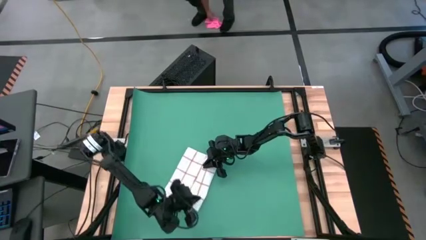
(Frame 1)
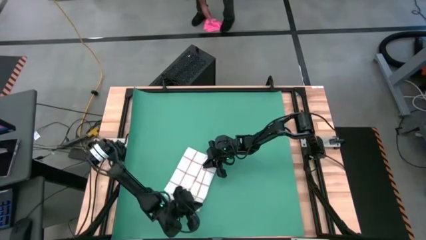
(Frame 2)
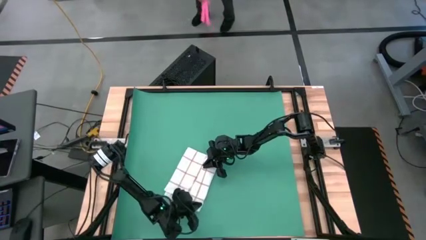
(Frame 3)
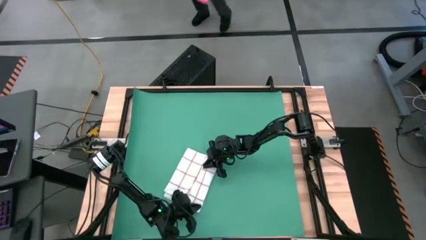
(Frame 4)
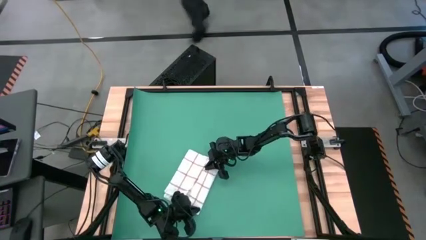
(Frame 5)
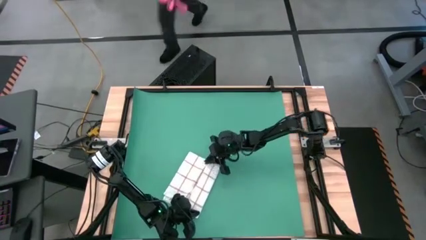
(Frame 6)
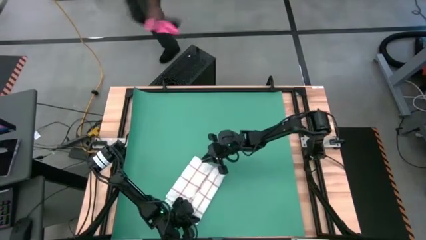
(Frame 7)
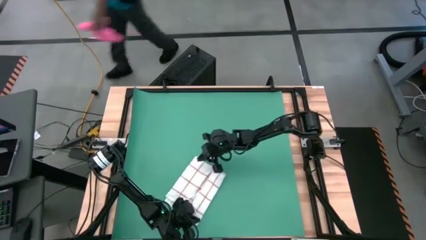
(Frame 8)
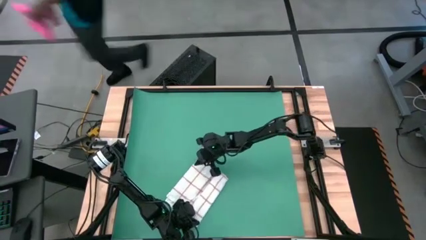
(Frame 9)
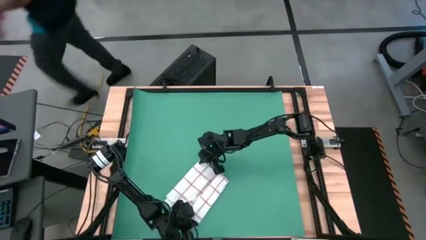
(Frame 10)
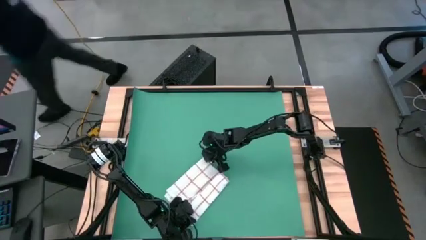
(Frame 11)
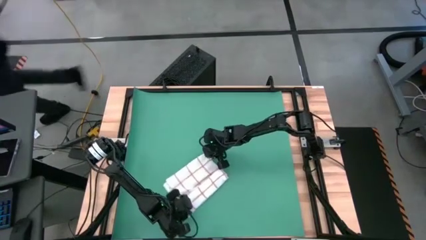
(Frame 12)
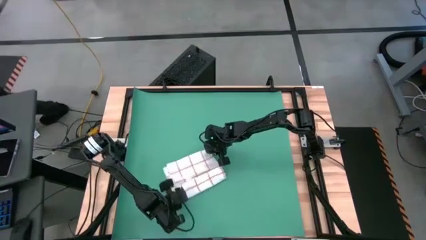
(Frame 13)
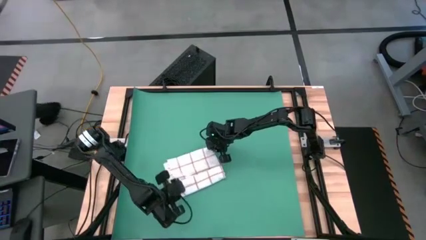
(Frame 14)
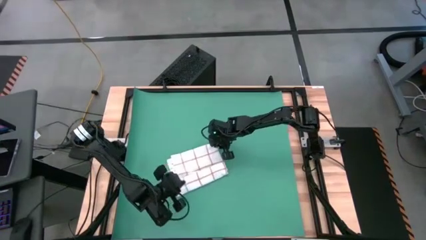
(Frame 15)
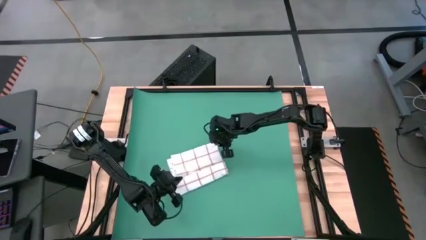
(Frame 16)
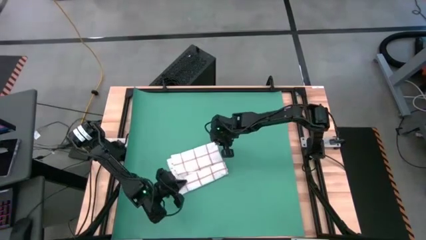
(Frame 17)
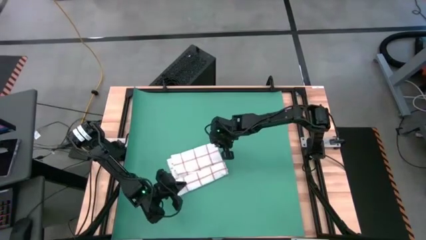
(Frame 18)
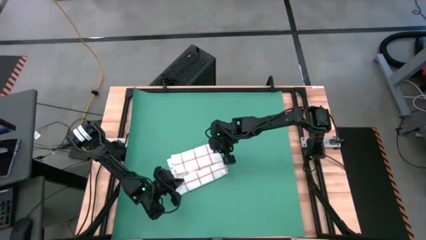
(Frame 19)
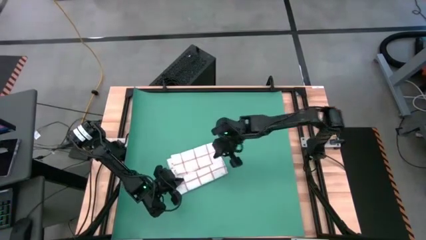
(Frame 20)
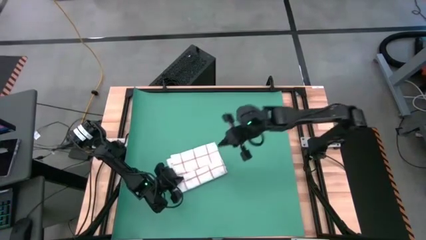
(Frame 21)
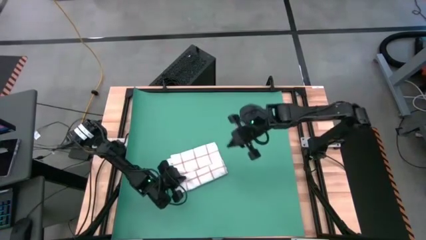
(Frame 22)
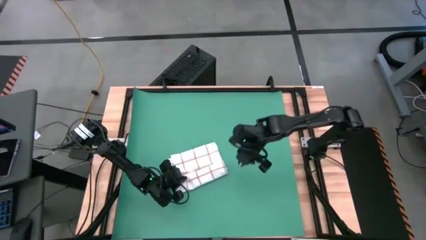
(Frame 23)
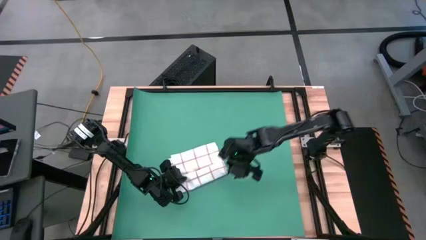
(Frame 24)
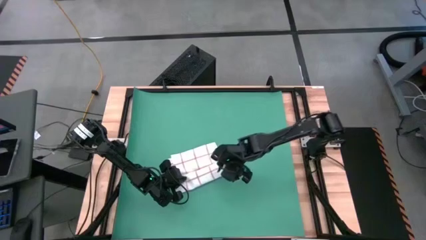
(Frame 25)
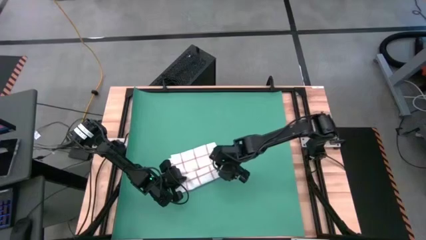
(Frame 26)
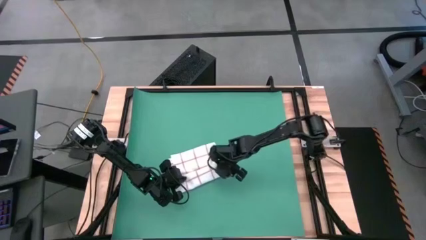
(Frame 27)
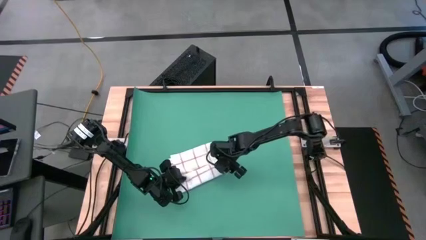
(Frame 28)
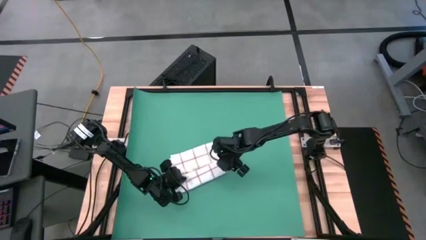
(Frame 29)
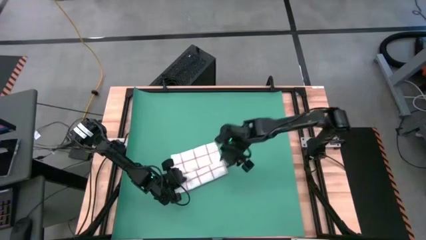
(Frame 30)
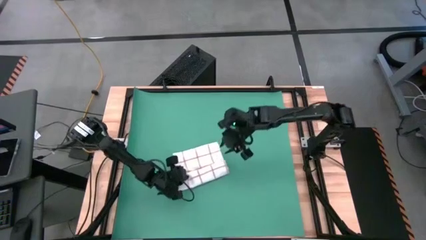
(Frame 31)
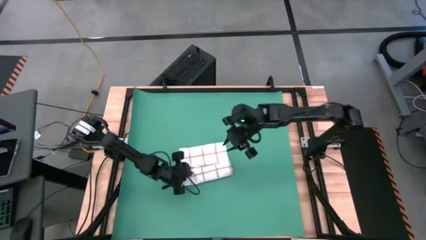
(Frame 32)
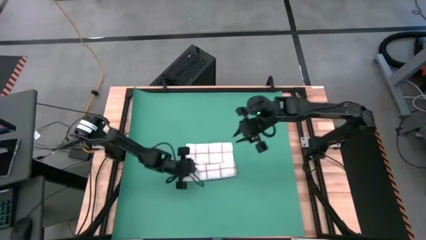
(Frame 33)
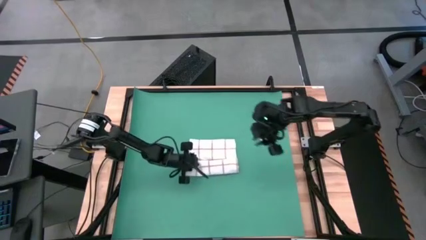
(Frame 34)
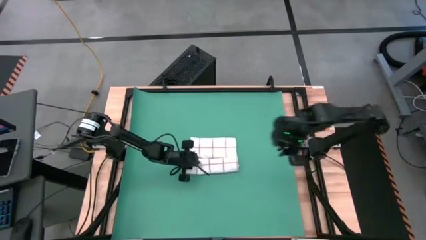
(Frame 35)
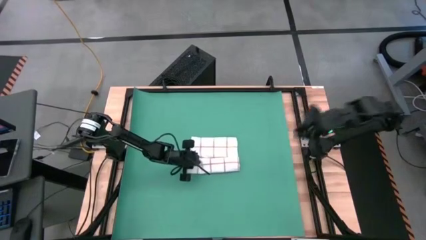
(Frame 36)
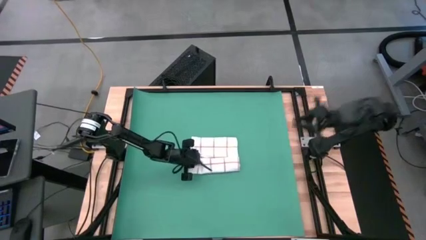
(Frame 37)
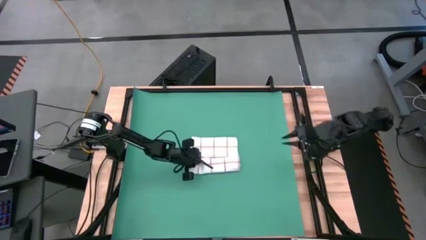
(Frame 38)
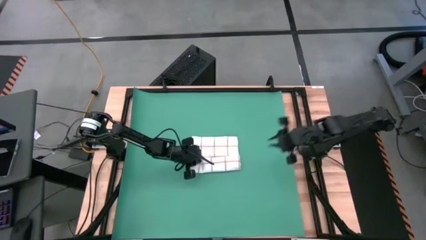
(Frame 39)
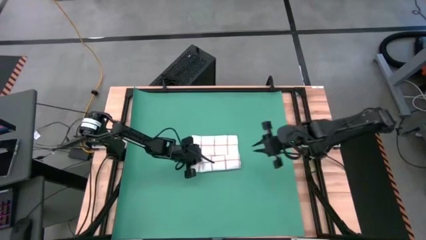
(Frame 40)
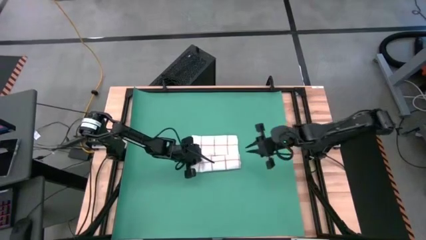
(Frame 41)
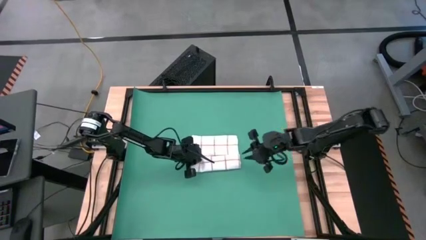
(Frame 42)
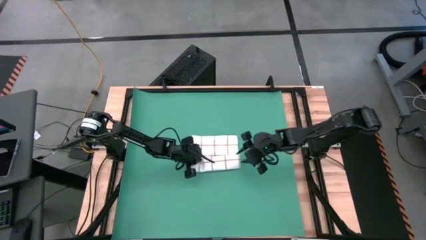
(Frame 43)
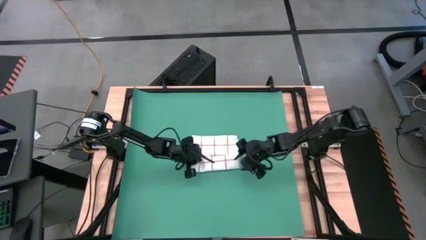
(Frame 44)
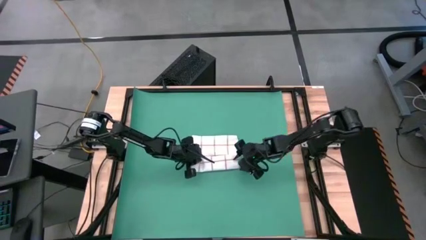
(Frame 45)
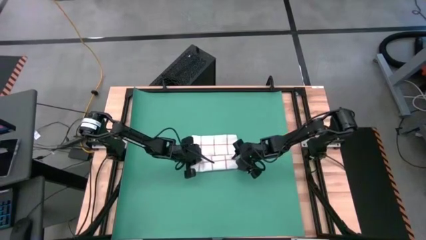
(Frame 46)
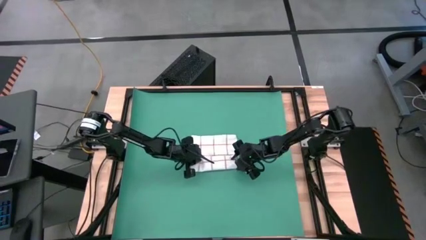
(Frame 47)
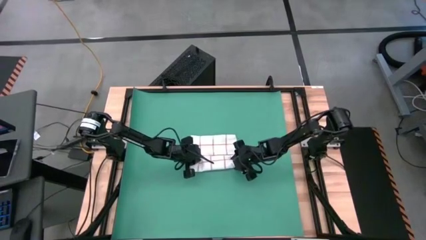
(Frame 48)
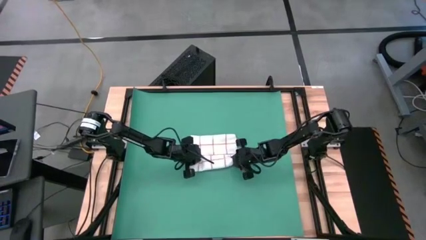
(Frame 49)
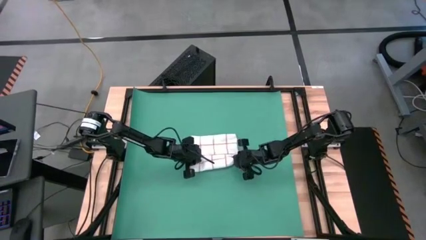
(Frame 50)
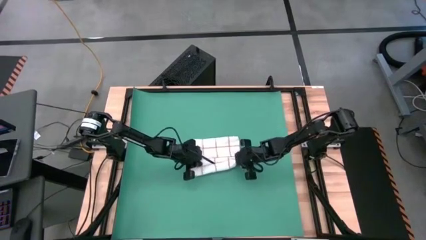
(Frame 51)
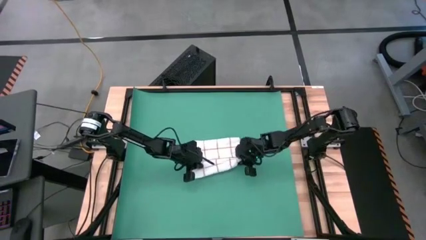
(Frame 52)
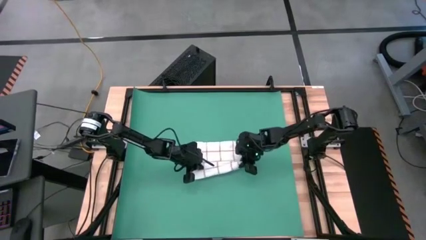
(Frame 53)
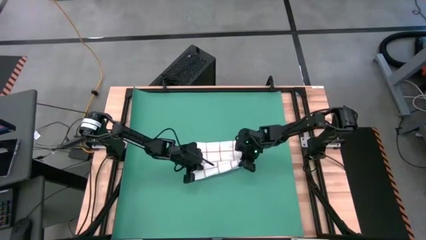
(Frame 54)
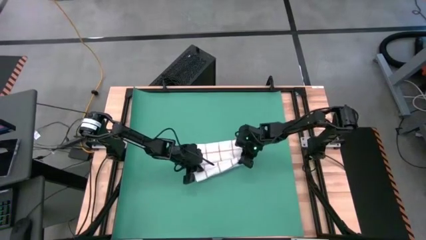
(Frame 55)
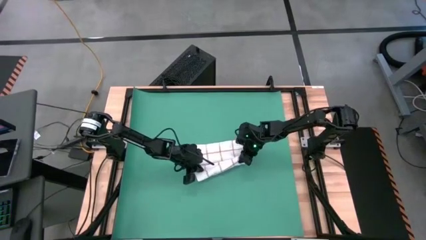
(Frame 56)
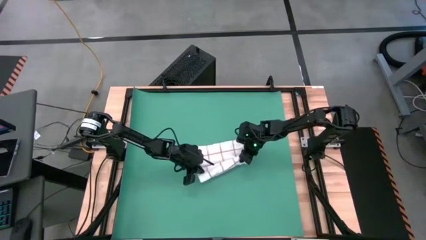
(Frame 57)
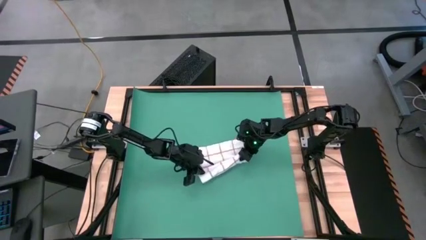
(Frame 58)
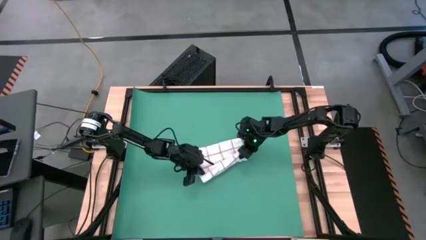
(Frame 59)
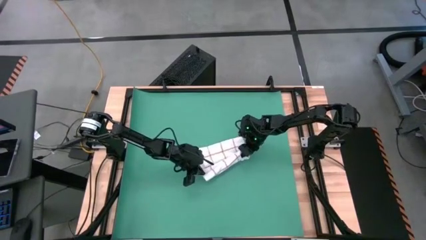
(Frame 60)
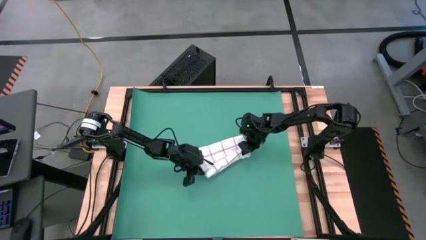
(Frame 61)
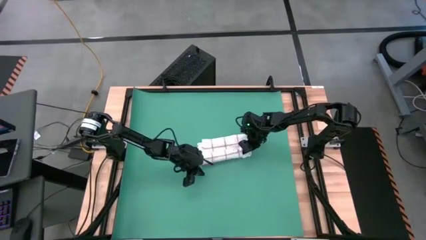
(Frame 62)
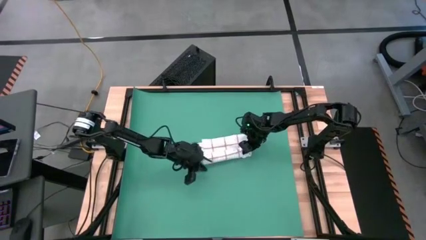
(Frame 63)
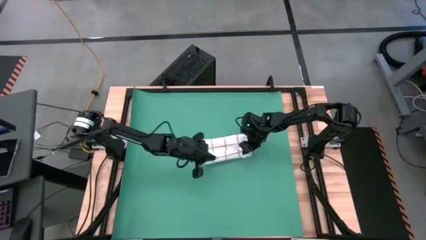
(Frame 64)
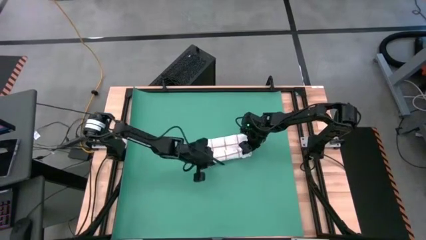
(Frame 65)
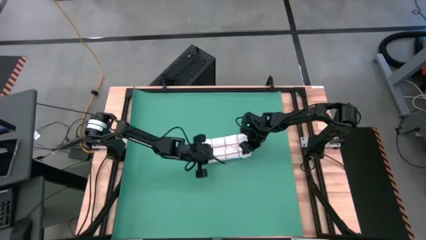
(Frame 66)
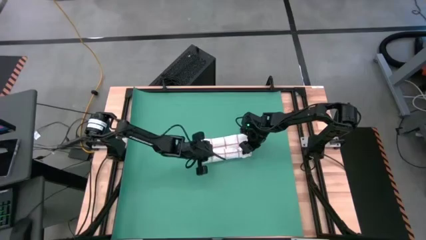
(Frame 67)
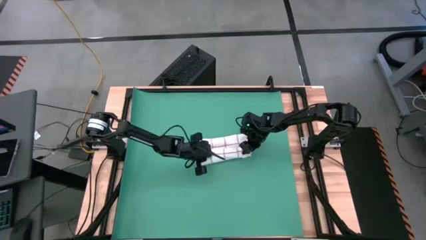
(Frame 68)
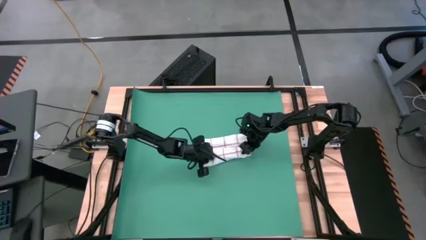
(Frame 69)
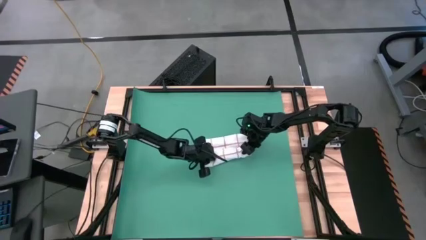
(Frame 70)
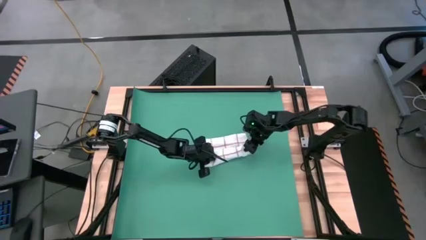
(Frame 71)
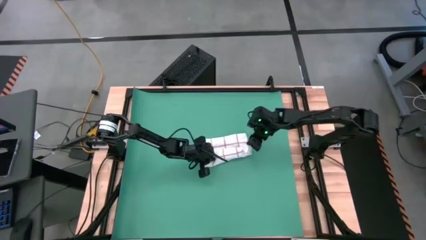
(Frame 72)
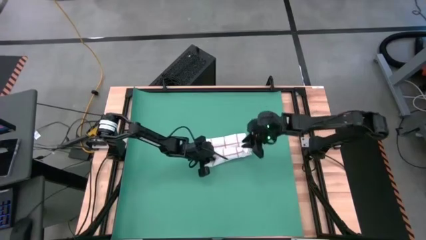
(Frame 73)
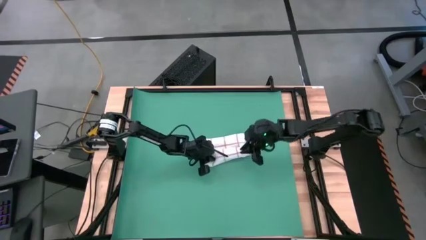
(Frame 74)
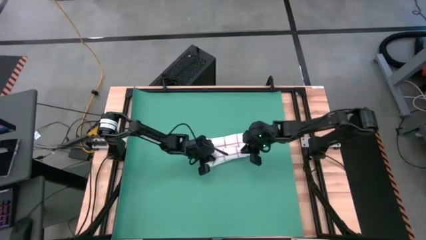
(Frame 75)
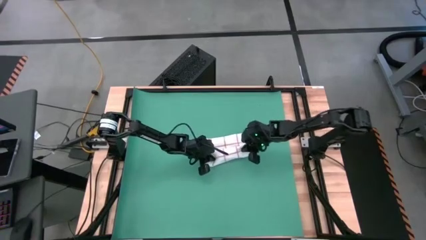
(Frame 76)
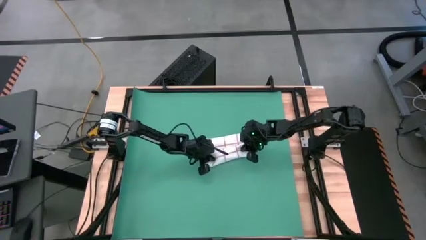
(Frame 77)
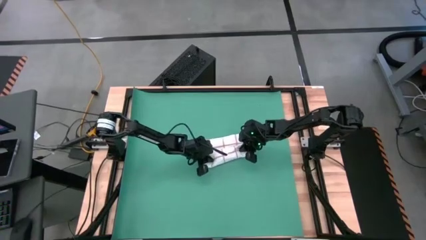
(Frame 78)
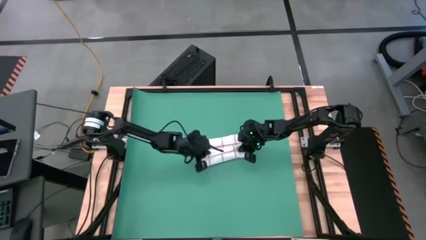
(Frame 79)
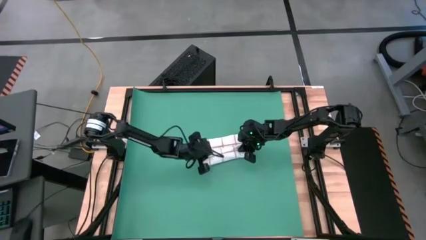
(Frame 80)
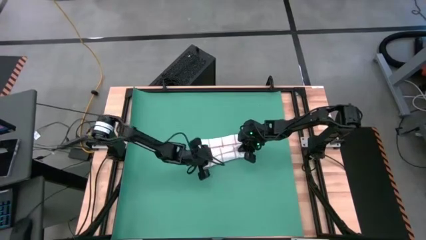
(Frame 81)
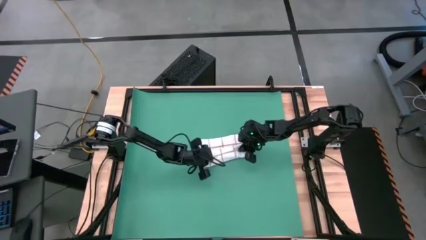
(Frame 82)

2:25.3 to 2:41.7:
Task: Roll towel
Roll the white towel
